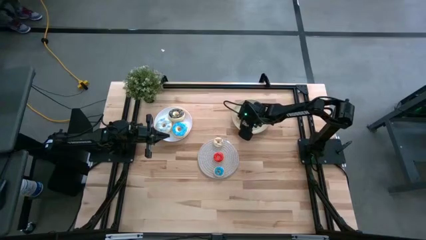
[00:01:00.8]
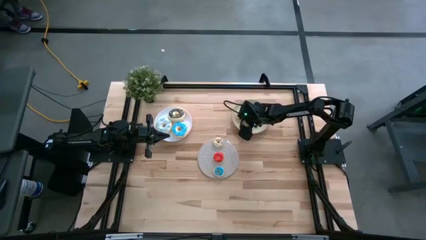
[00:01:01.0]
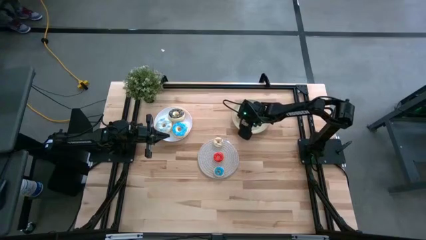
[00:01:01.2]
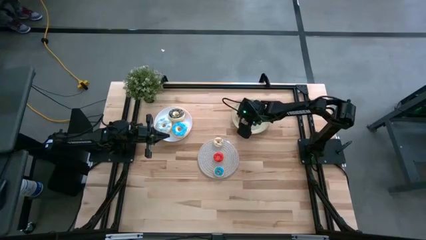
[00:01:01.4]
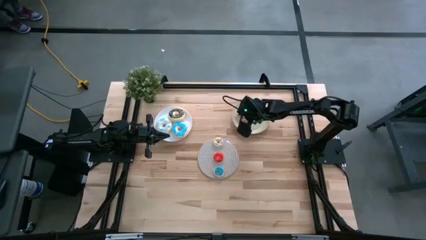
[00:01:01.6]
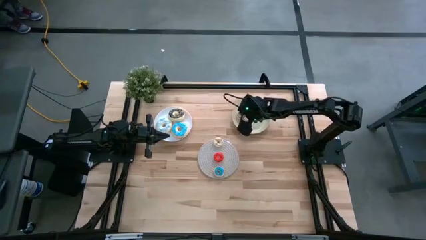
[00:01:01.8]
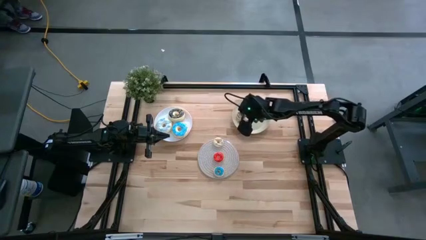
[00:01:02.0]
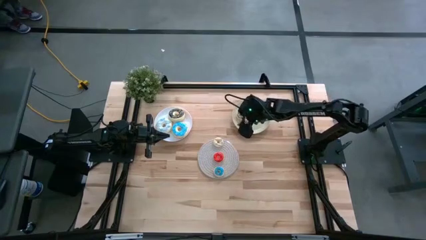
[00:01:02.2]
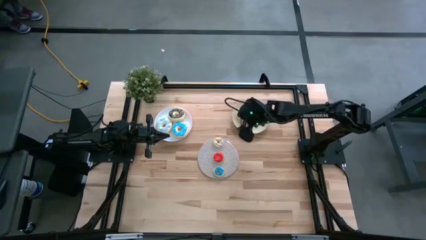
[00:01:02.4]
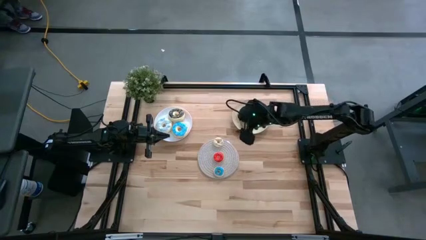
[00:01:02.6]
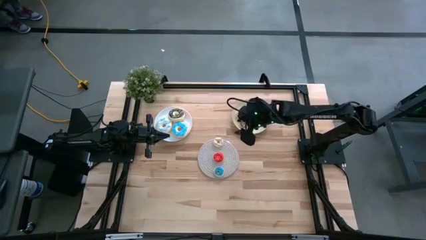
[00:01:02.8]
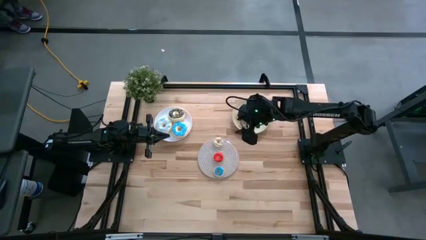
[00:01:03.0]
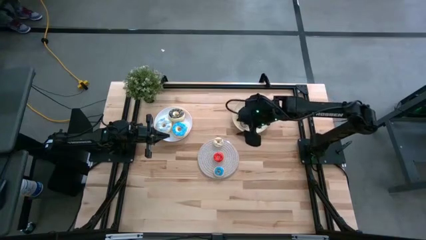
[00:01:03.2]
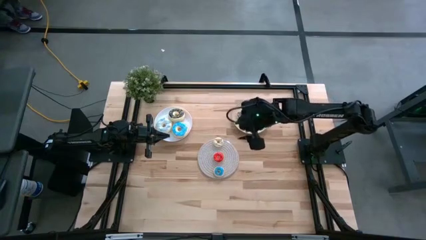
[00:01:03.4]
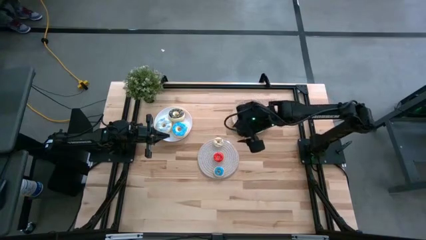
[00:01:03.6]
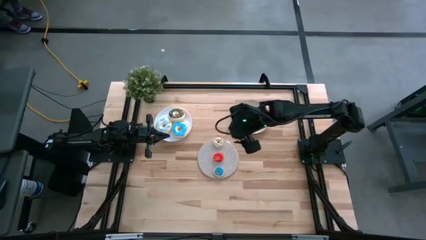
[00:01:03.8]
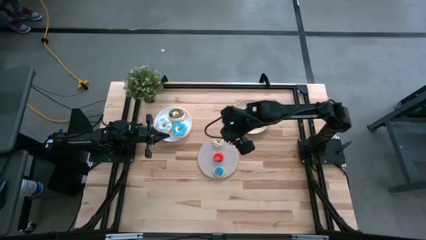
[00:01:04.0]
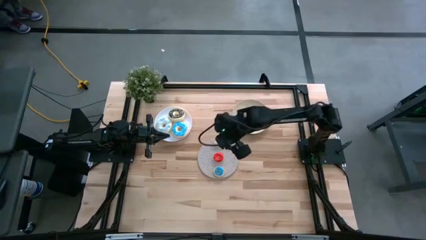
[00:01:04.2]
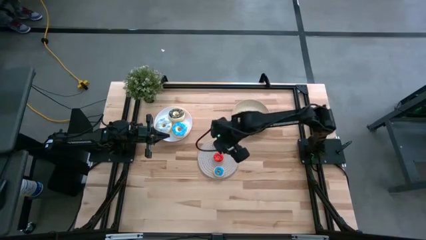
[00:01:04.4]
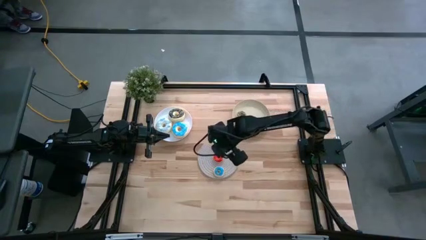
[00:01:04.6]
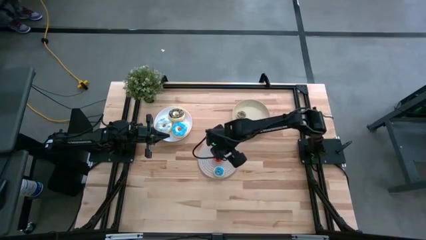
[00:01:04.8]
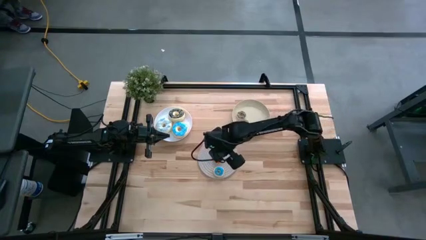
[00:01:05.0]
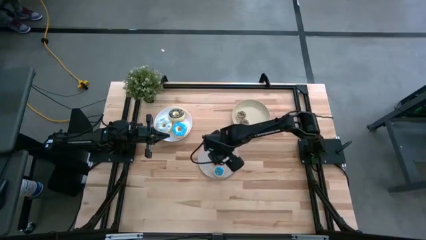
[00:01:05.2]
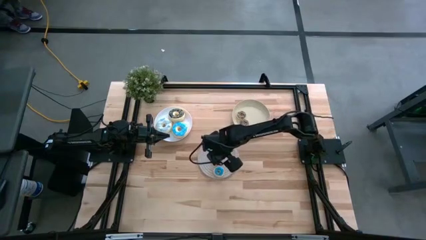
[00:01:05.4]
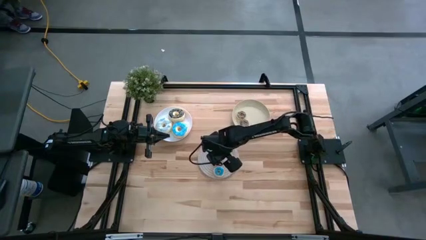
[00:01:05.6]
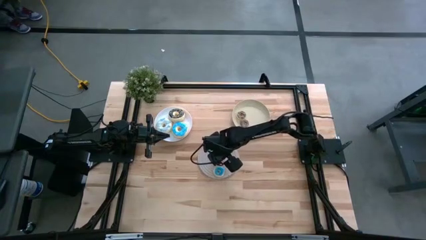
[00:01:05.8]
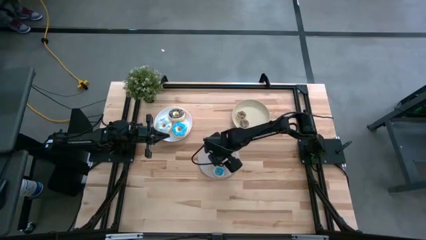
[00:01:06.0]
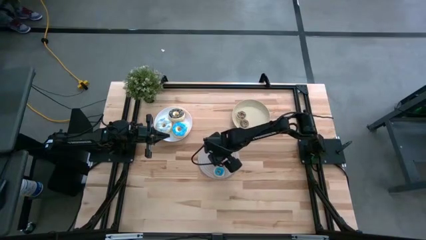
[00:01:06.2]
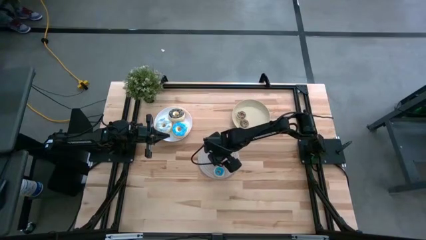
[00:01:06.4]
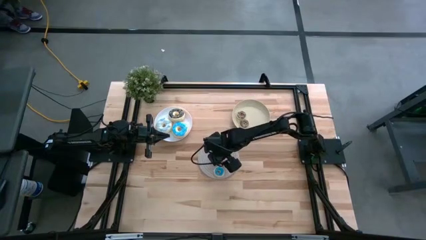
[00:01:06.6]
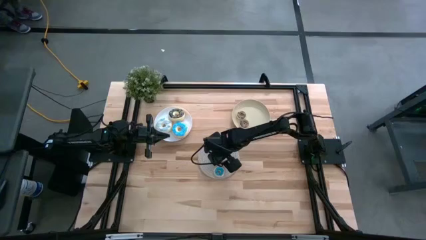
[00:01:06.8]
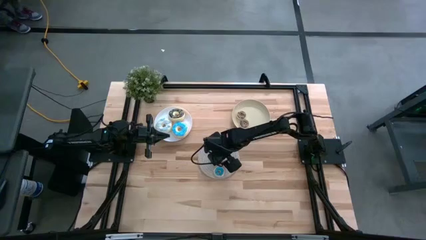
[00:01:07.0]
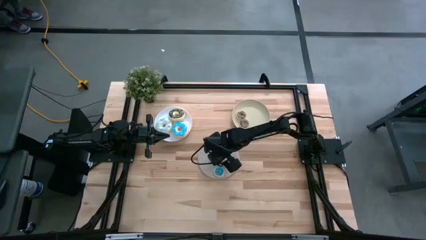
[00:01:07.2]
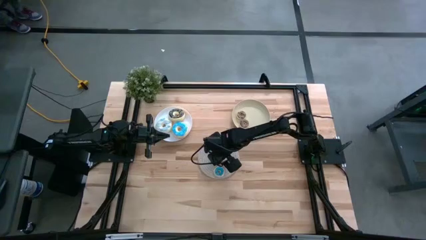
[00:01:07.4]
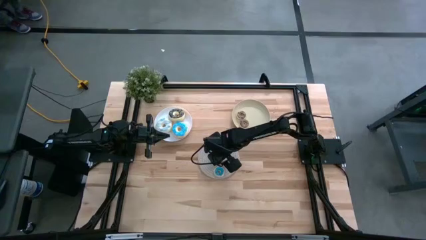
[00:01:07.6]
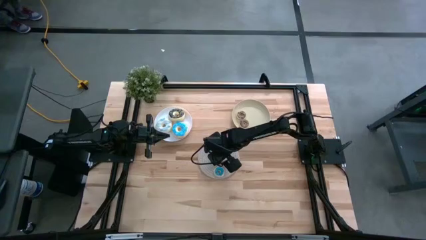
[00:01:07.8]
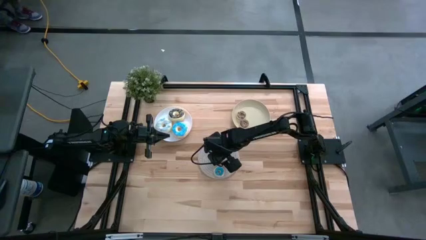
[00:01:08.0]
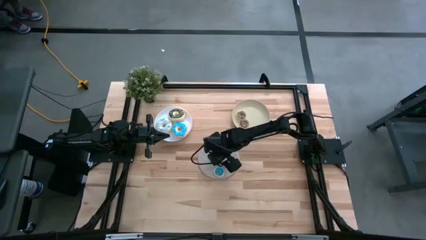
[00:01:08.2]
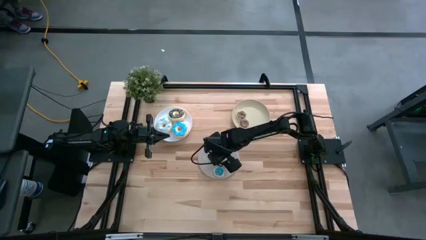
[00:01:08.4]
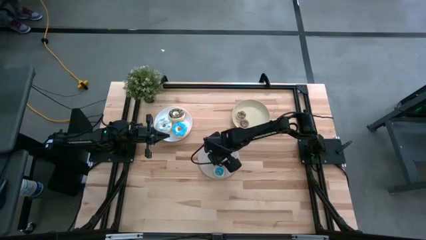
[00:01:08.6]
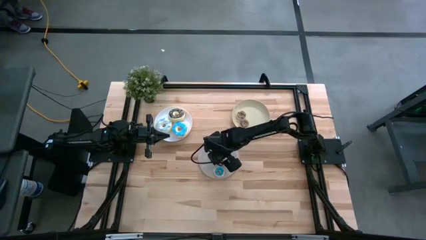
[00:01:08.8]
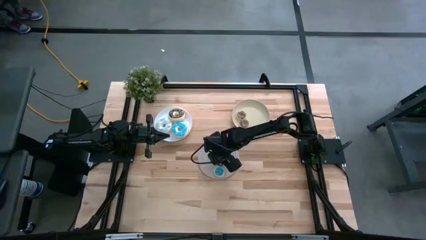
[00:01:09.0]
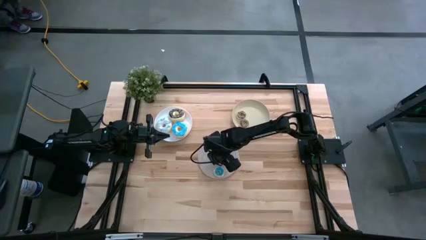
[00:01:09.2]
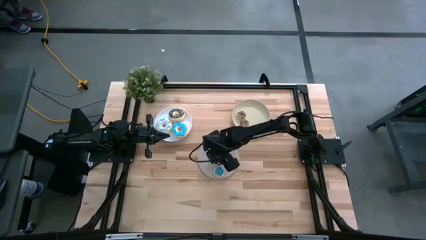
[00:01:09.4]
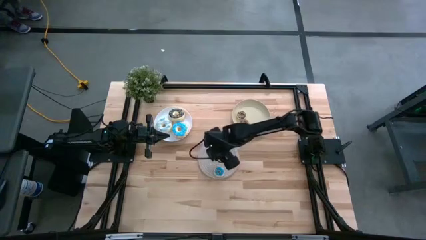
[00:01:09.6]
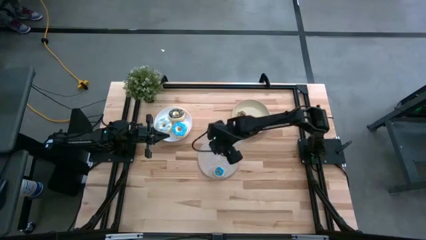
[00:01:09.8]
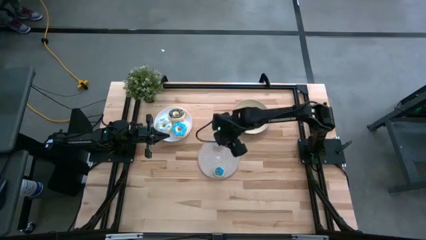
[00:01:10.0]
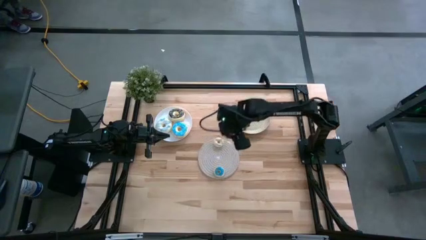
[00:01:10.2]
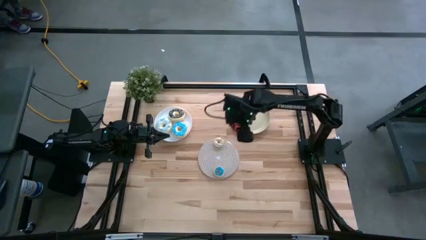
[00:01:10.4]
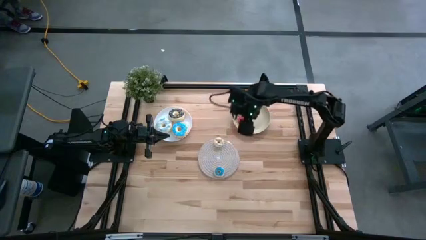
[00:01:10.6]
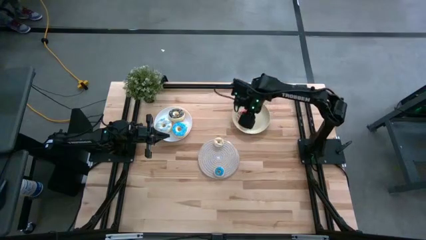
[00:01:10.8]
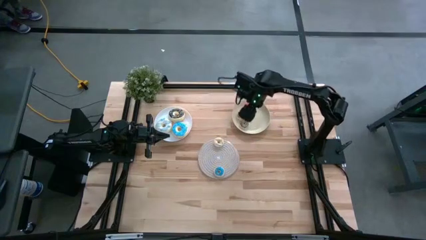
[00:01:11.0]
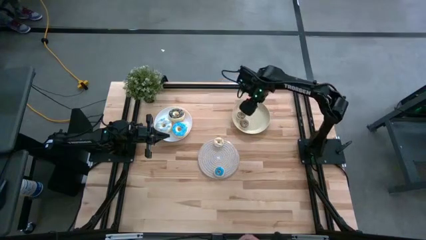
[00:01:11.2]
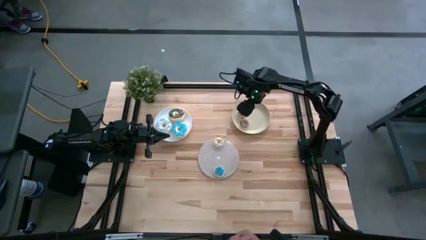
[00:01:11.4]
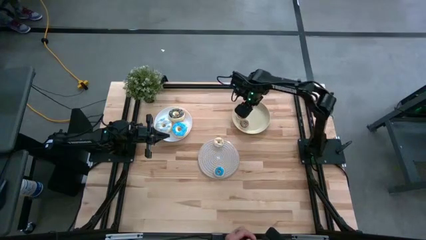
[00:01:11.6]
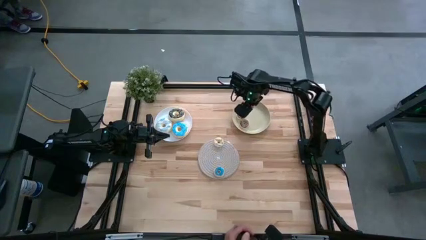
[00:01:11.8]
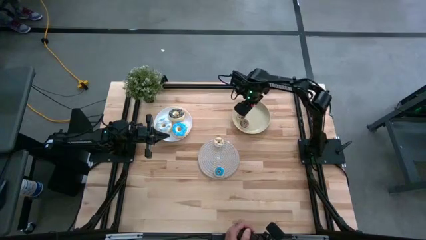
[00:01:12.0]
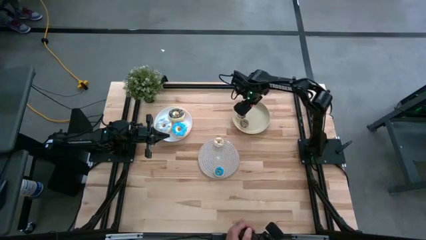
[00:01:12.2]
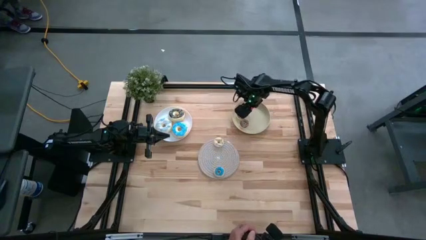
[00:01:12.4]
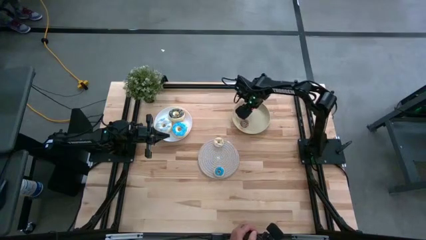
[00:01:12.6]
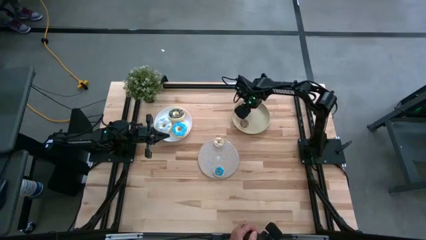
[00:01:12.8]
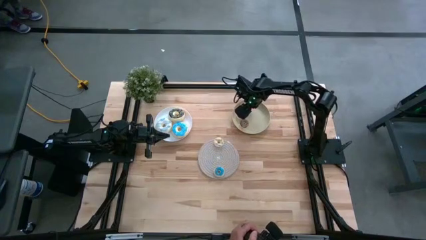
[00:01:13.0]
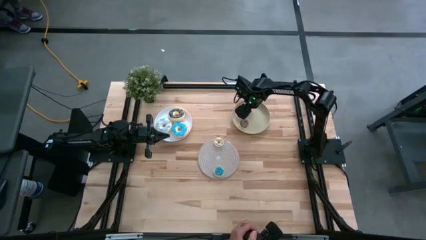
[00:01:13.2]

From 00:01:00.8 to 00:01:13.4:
Task: Pick & Place donuts
Put the small red donut on the brown plate

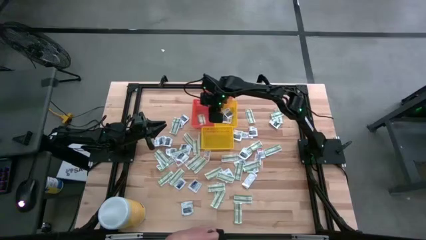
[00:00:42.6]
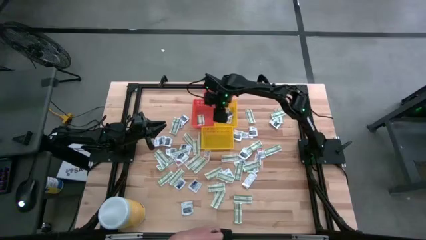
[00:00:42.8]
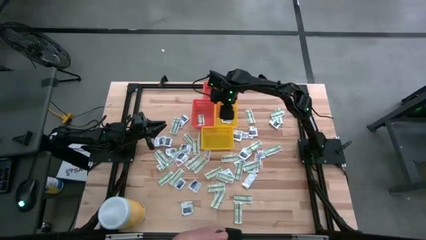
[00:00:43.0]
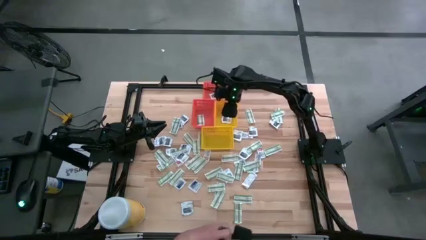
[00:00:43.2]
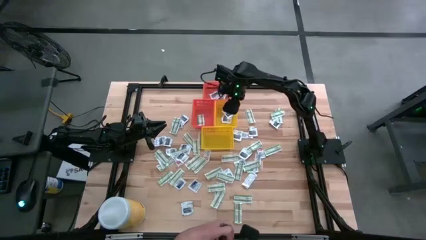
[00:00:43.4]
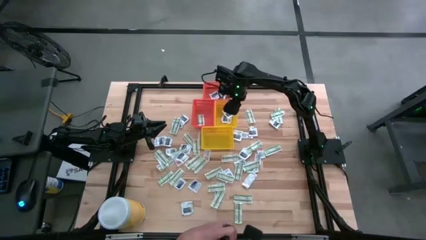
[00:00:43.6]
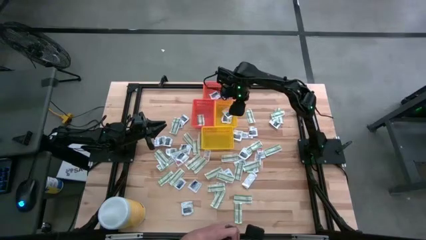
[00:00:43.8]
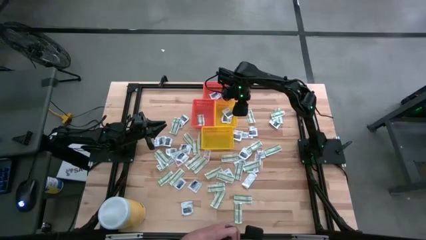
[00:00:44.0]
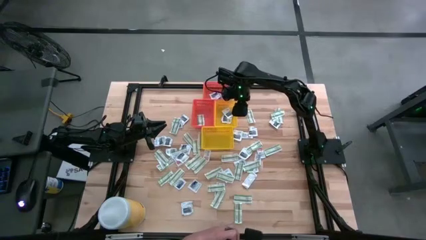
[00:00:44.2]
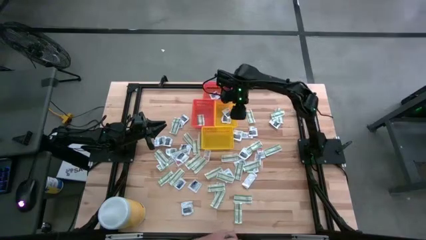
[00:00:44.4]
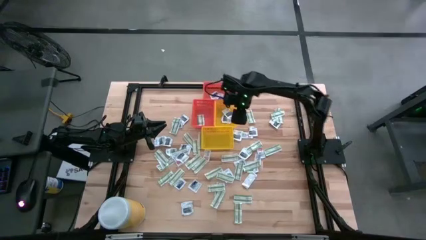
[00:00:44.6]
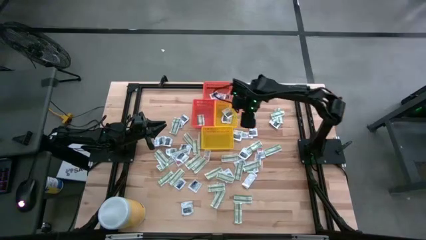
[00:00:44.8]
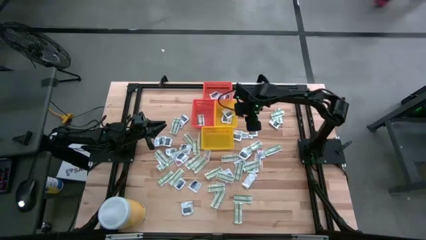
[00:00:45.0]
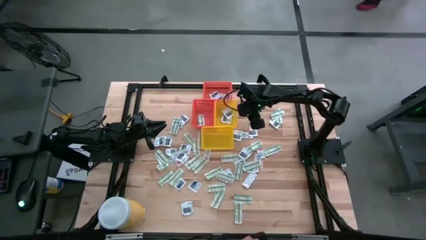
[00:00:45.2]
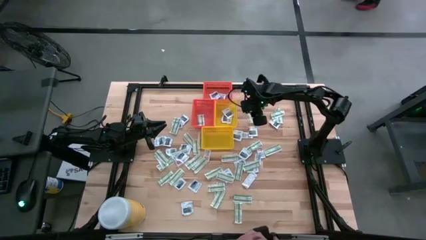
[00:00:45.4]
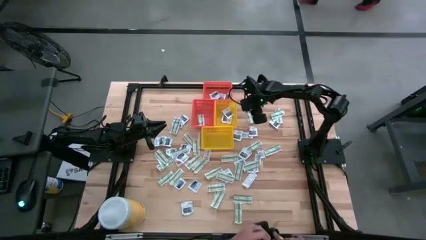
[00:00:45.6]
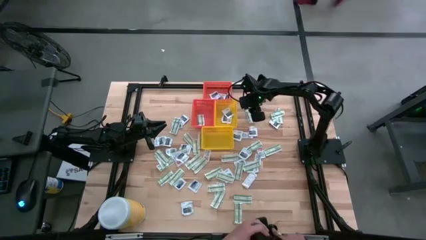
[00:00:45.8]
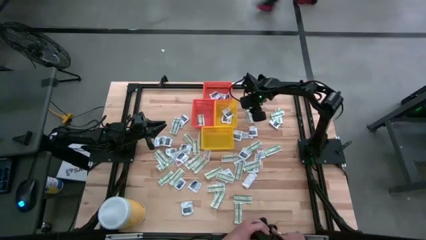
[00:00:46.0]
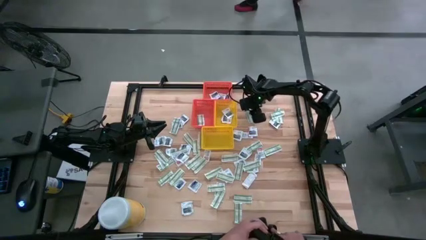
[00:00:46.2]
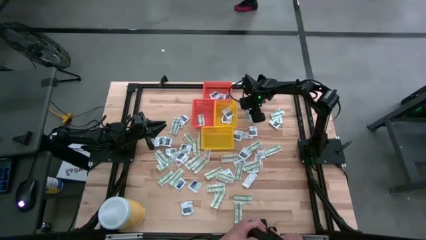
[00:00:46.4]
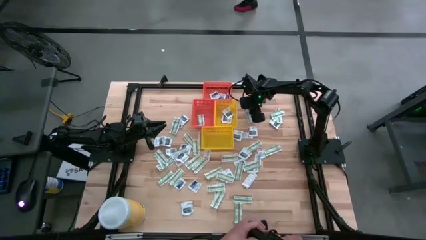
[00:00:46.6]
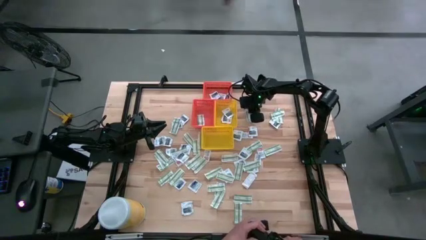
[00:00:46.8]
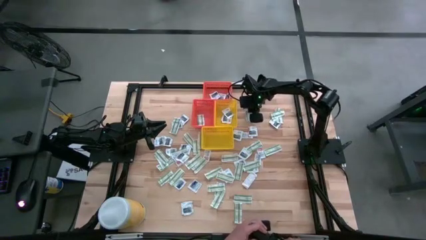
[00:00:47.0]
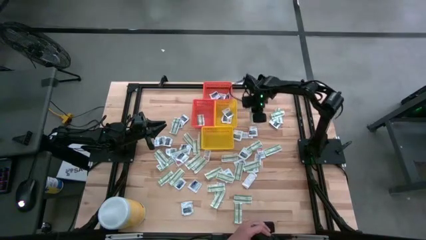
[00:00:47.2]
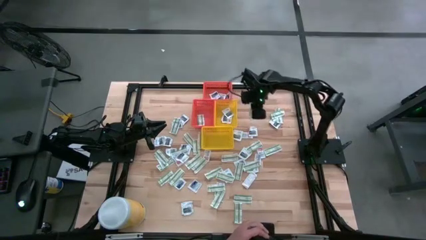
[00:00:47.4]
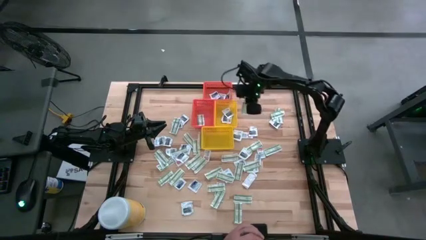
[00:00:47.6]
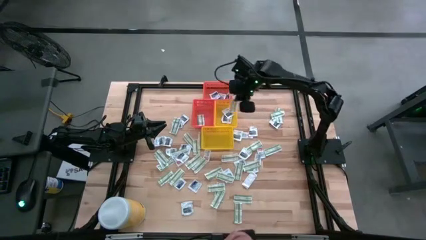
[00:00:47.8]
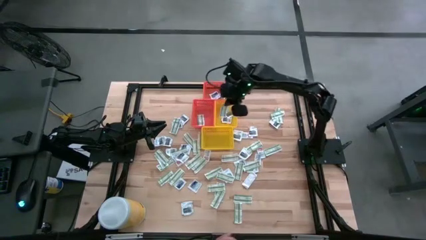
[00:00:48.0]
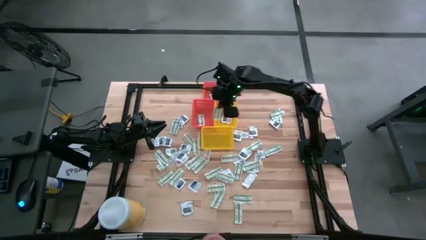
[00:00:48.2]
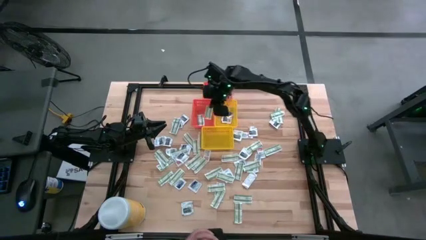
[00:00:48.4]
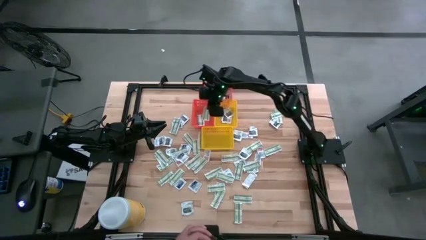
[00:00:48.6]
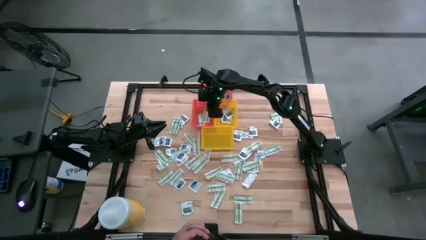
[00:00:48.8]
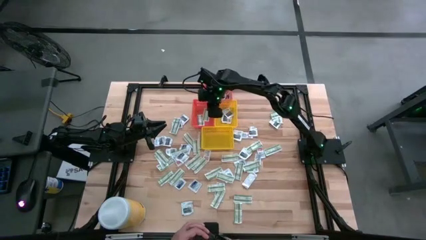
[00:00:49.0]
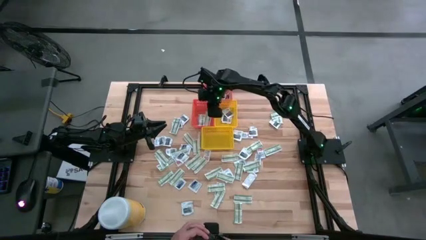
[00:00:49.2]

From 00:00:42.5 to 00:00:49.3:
Task: Pick & Place First Aid Supplies
Put the bandage into the bottom orange bin
